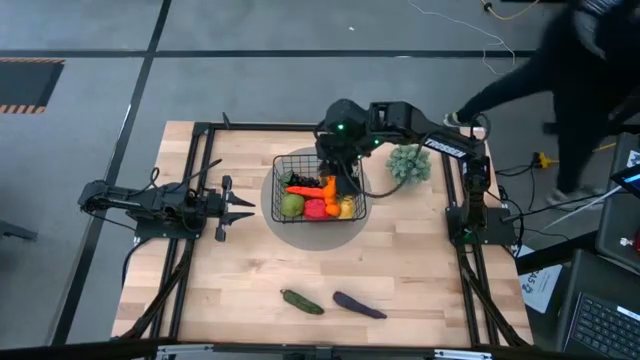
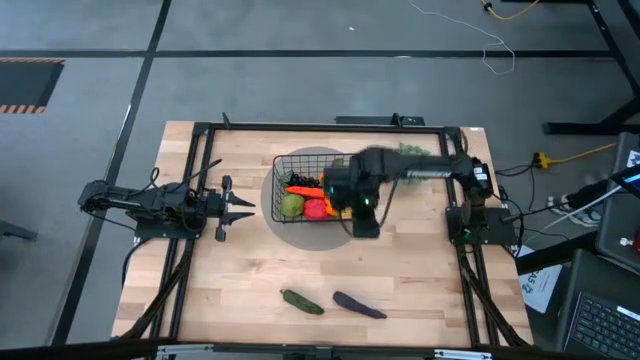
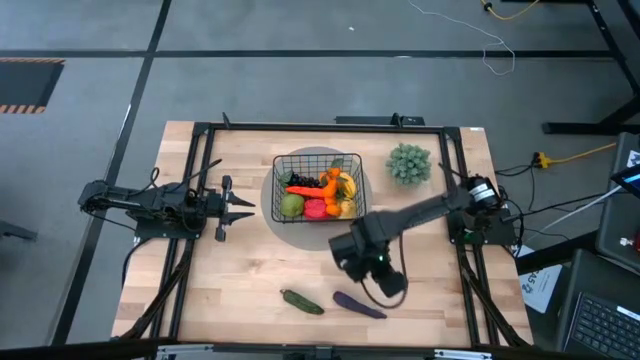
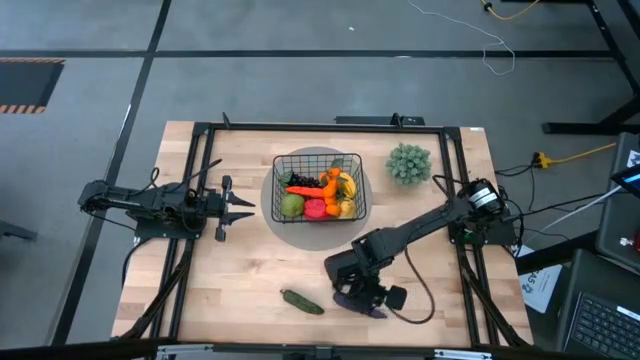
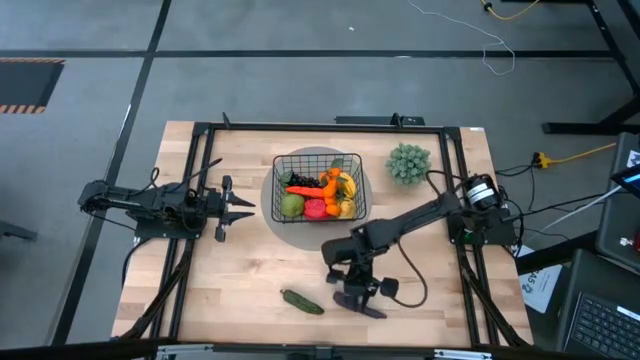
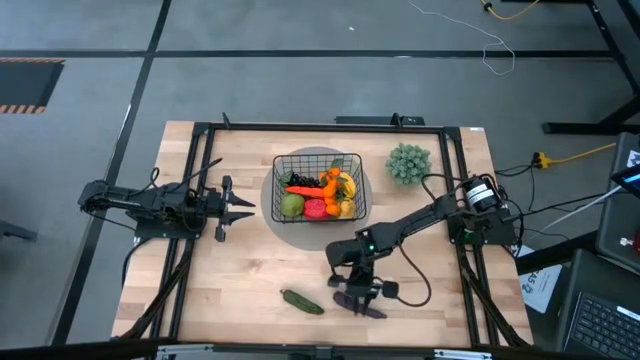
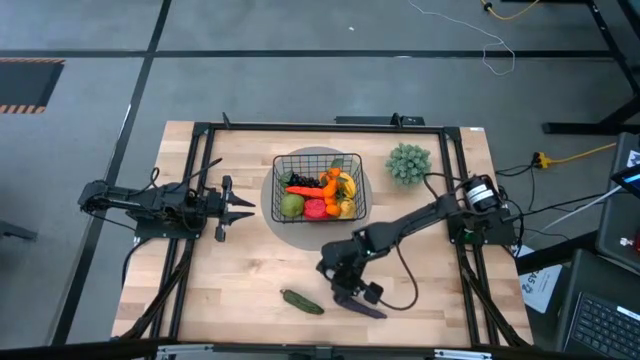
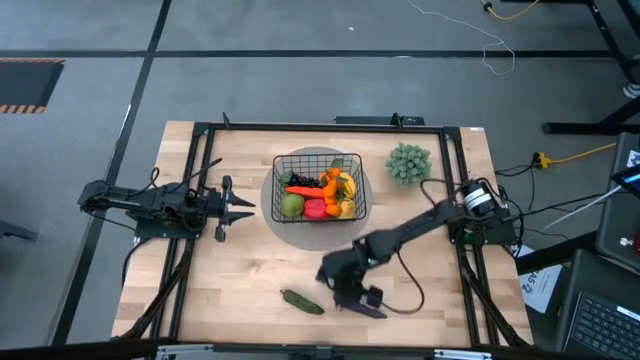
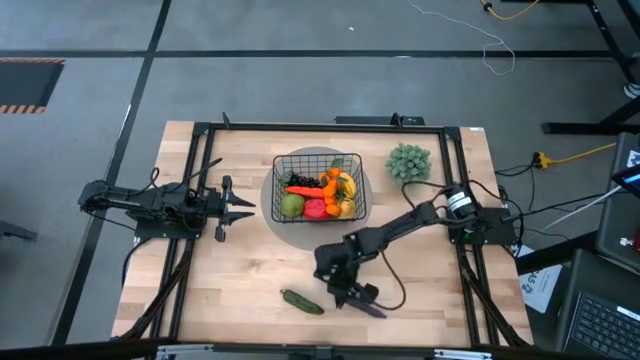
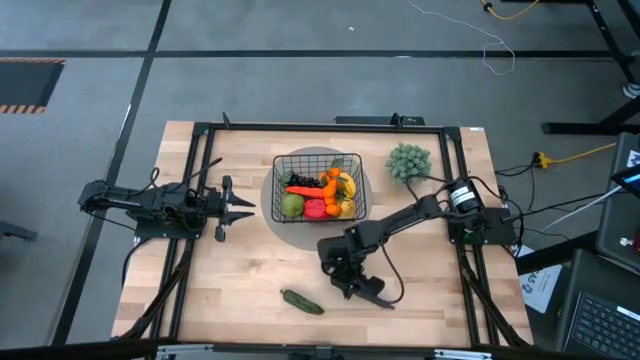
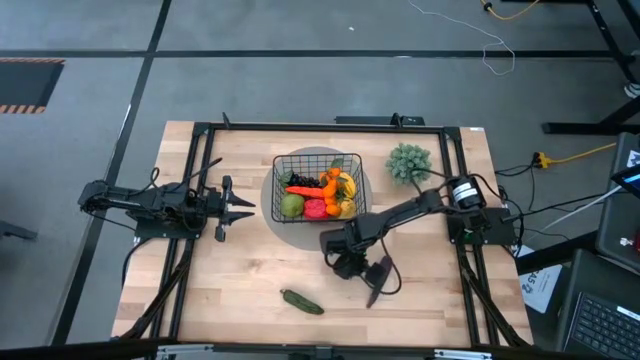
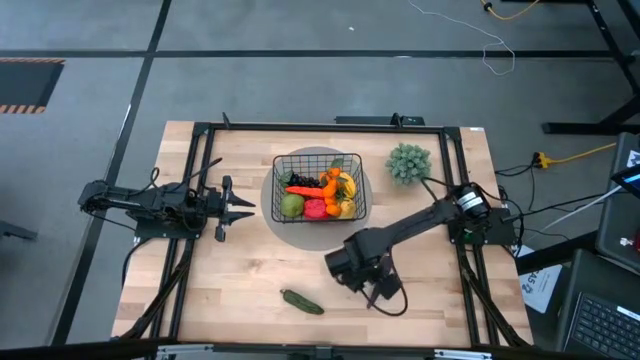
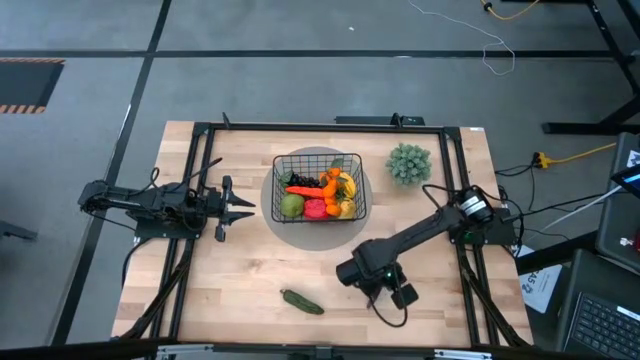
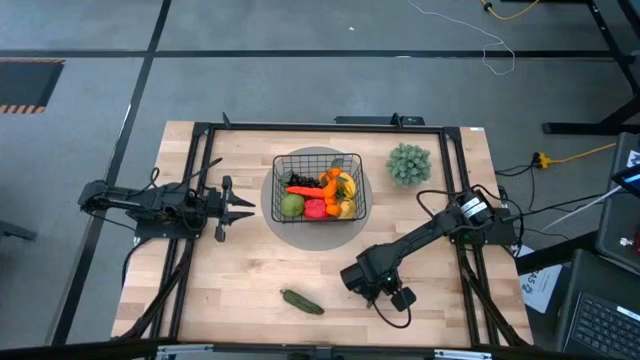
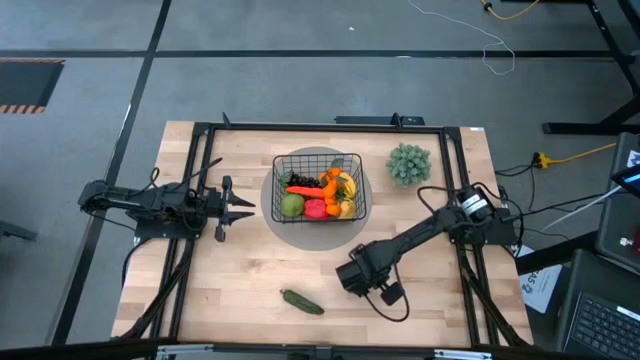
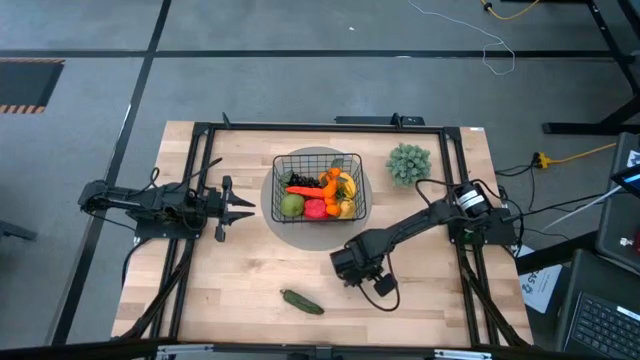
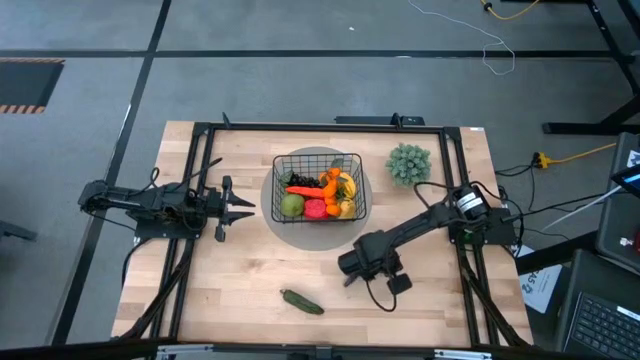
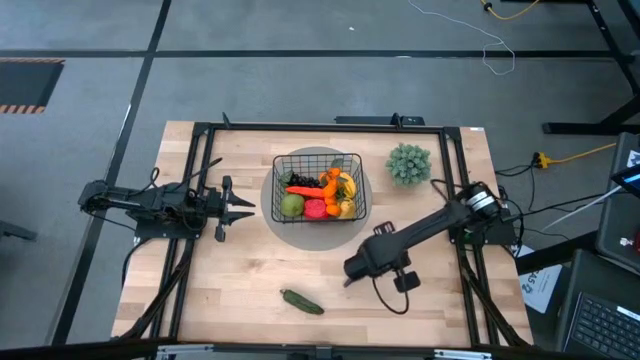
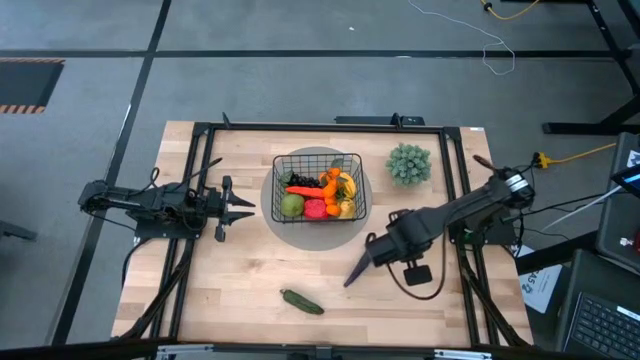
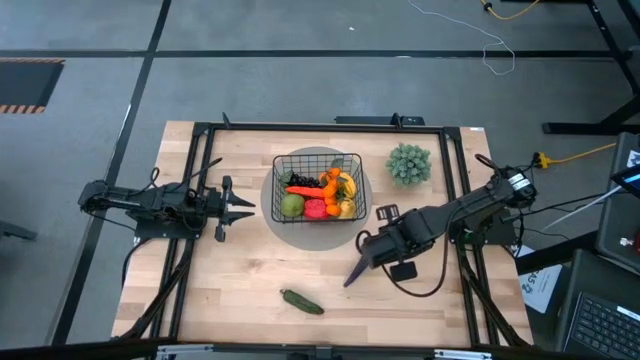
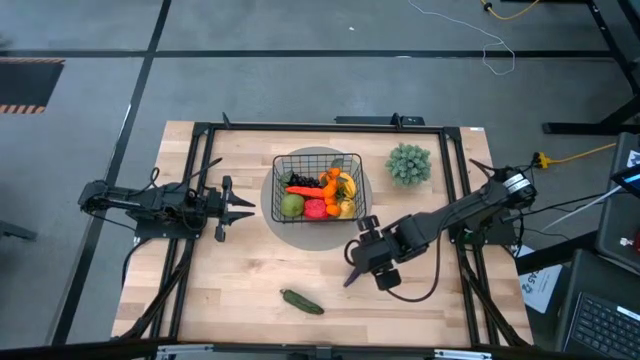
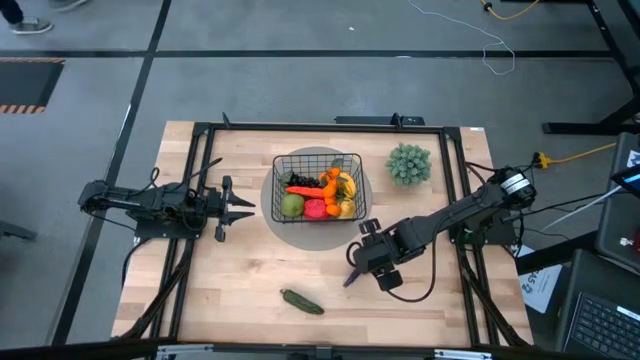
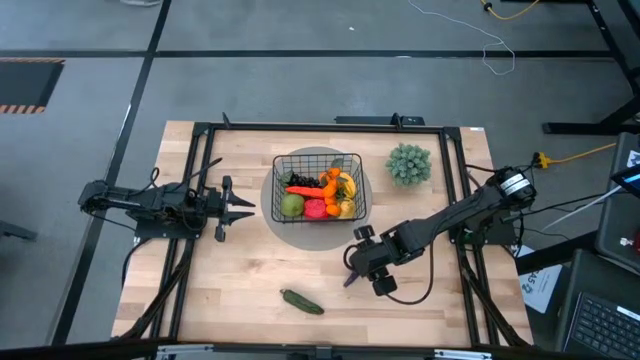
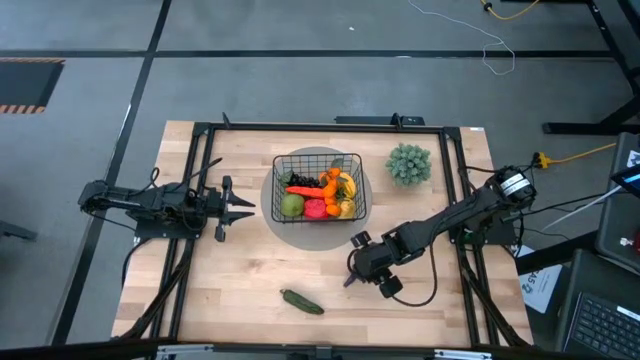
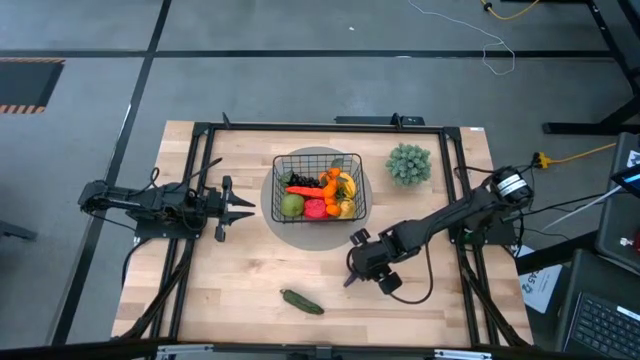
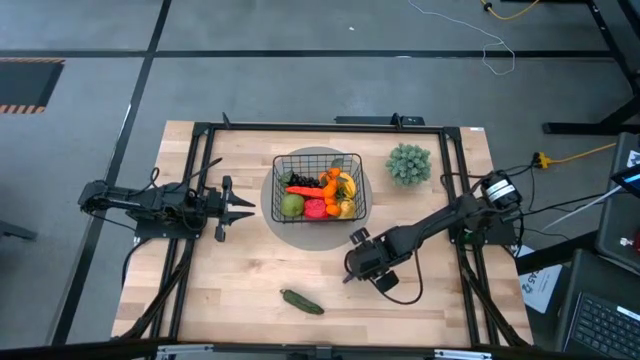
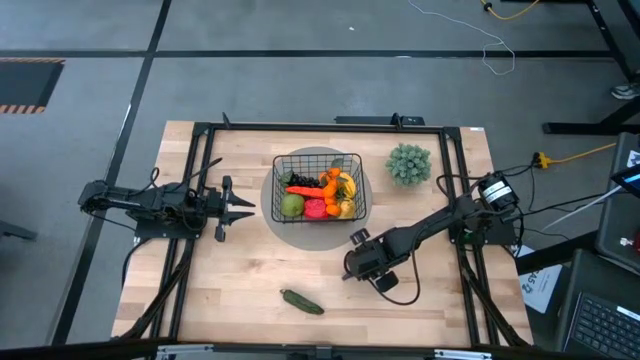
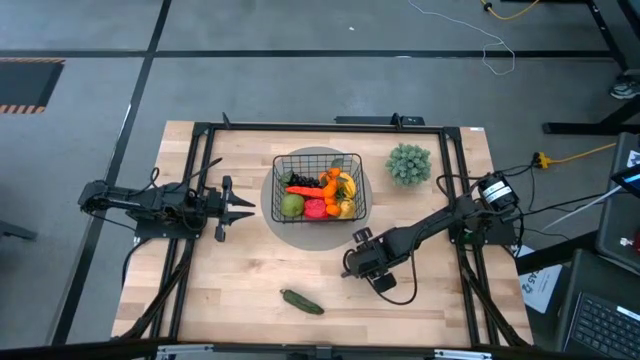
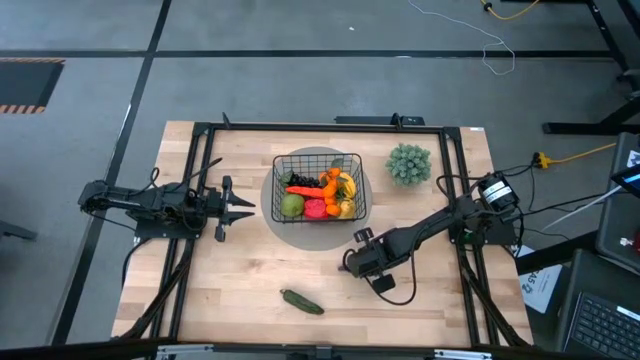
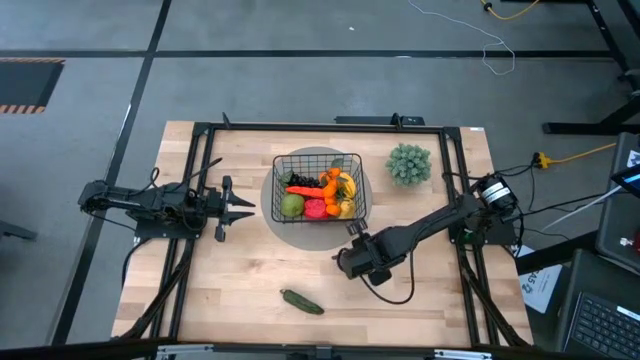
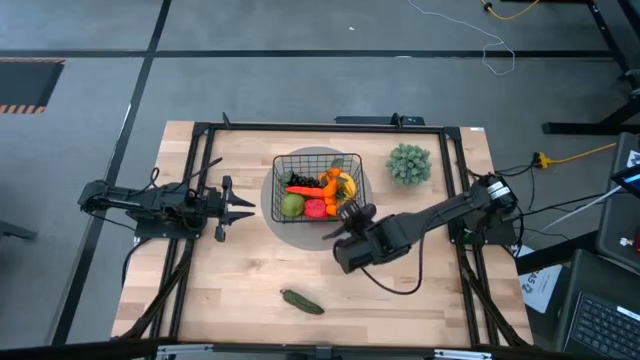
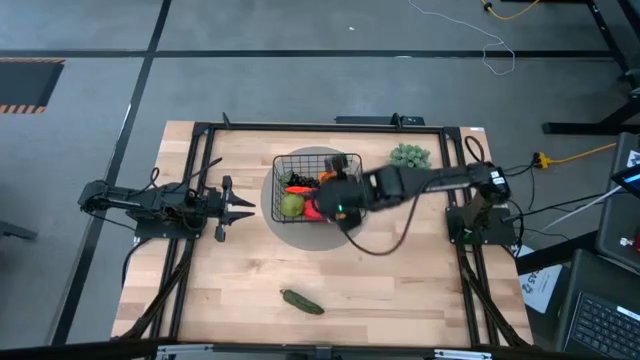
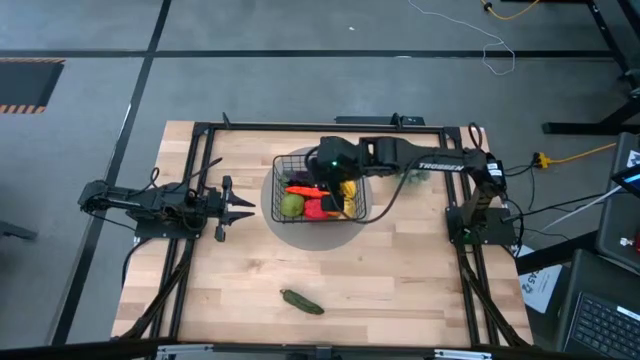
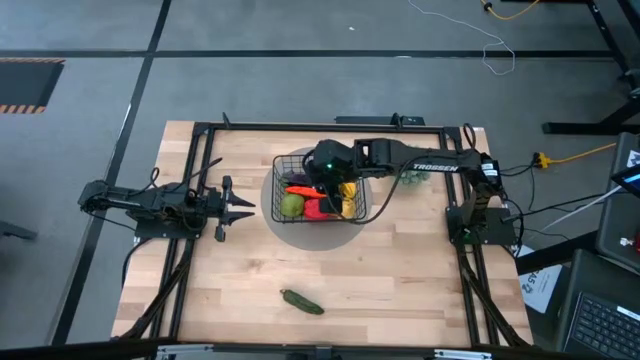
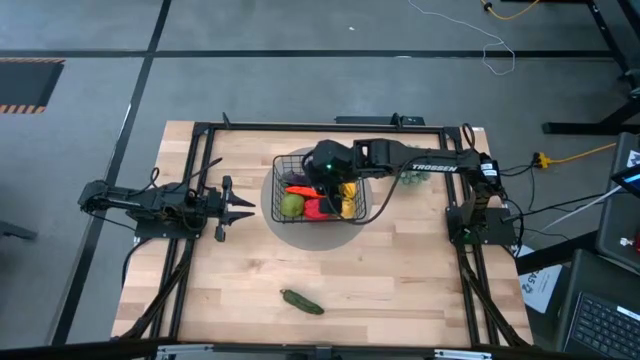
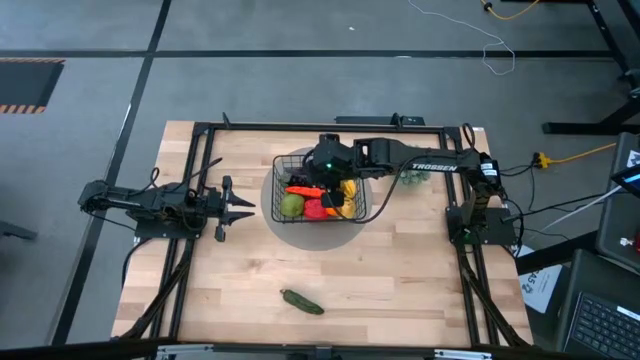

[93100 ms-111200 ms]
Task: Build produce basket
Put the purple eggplant into the black wire basket
